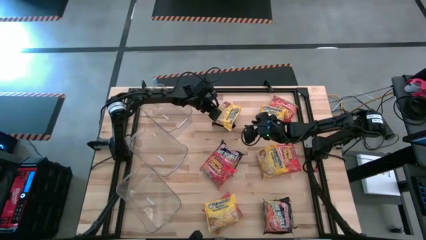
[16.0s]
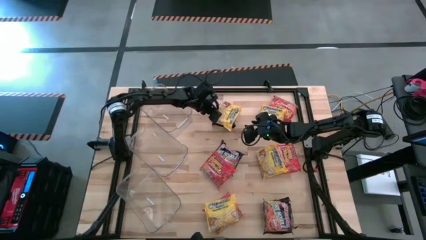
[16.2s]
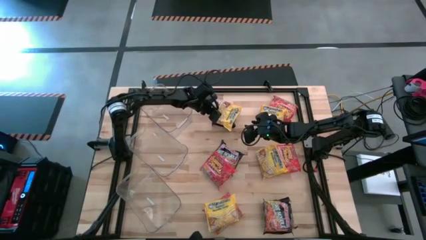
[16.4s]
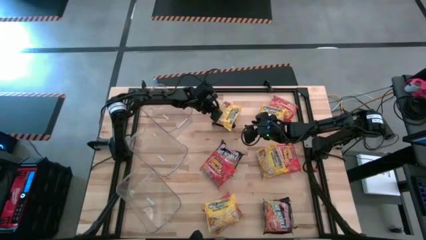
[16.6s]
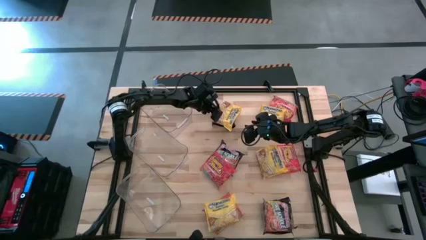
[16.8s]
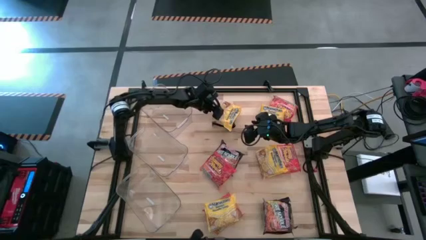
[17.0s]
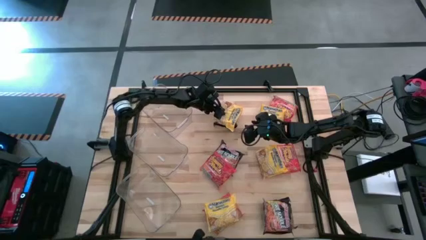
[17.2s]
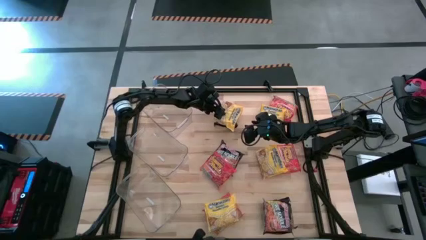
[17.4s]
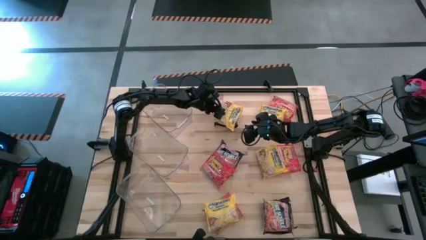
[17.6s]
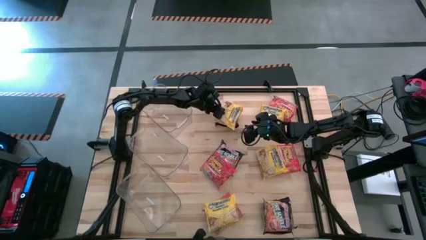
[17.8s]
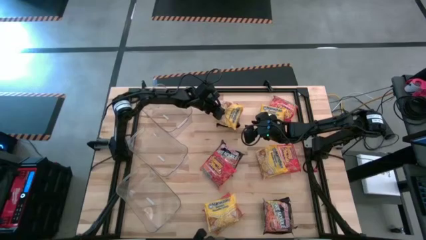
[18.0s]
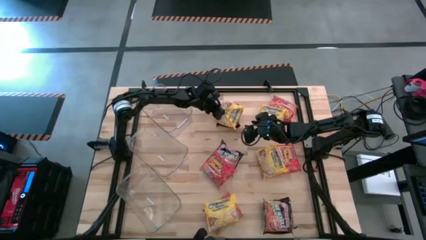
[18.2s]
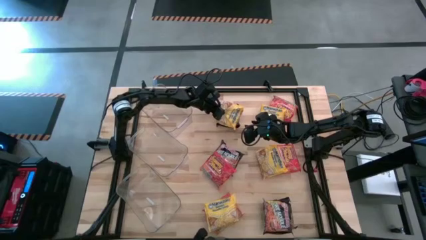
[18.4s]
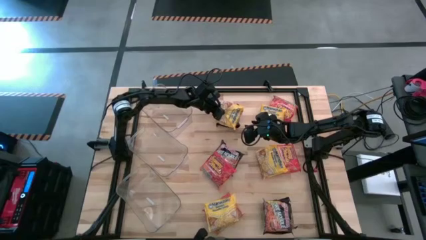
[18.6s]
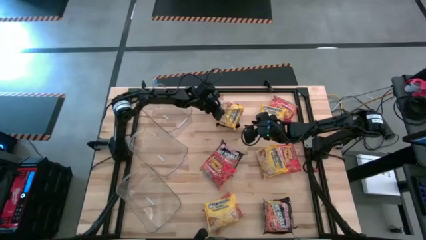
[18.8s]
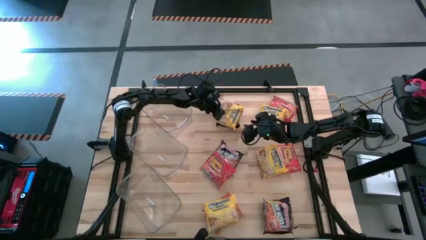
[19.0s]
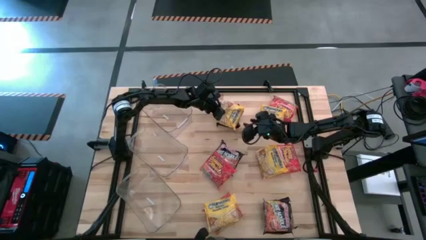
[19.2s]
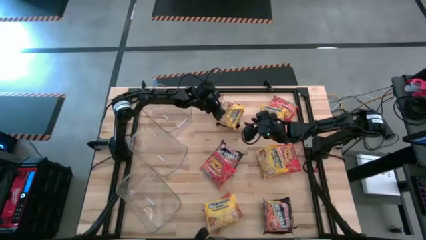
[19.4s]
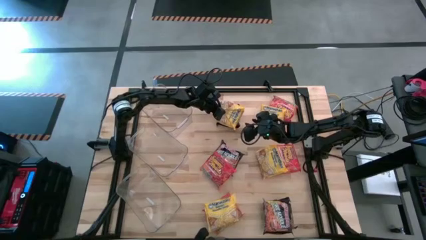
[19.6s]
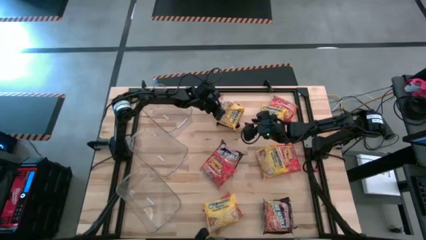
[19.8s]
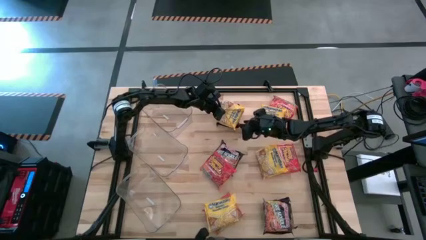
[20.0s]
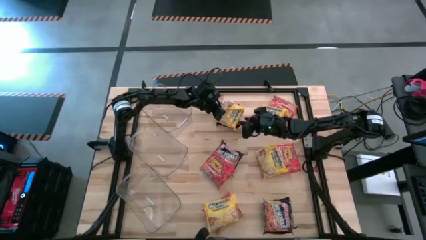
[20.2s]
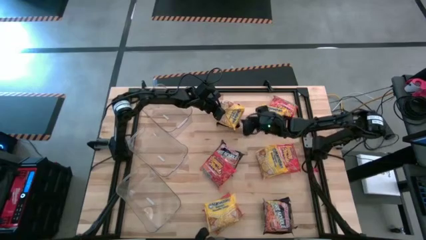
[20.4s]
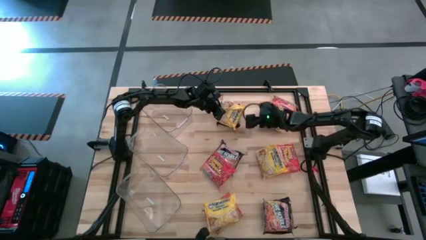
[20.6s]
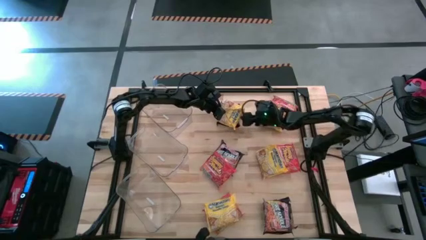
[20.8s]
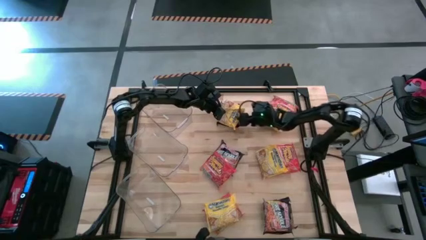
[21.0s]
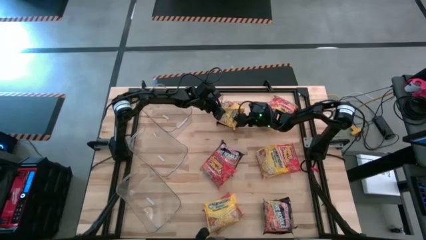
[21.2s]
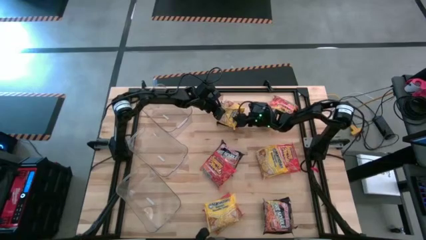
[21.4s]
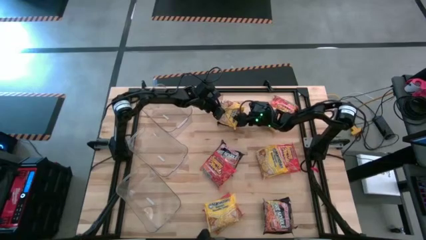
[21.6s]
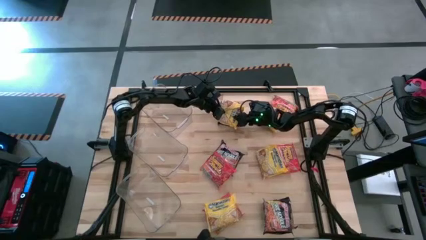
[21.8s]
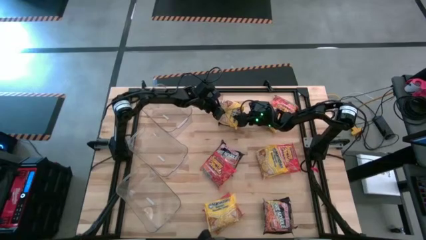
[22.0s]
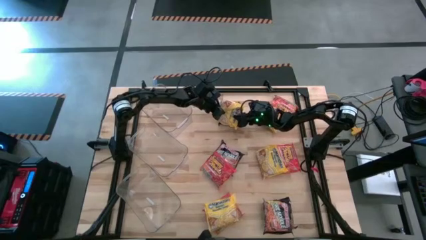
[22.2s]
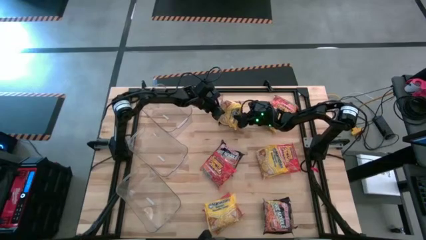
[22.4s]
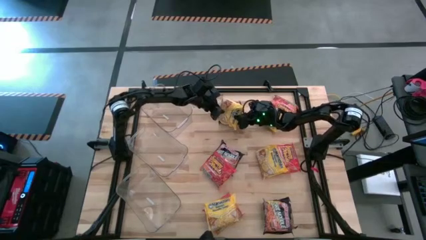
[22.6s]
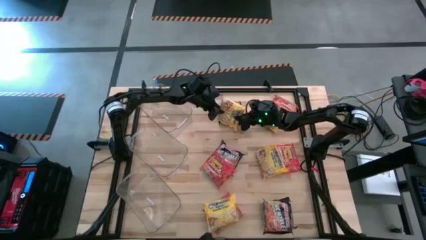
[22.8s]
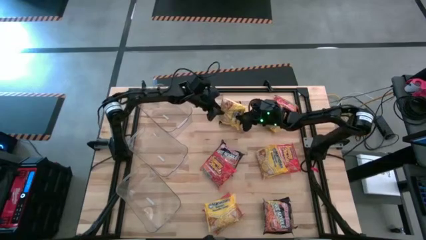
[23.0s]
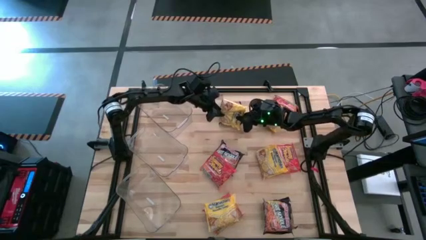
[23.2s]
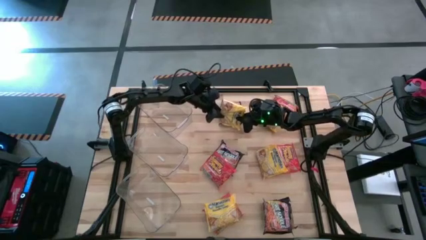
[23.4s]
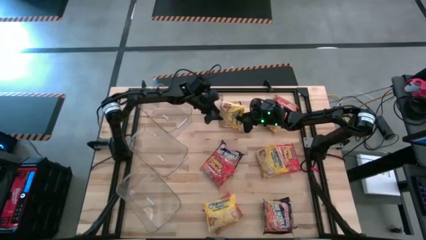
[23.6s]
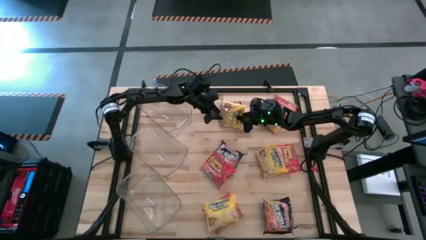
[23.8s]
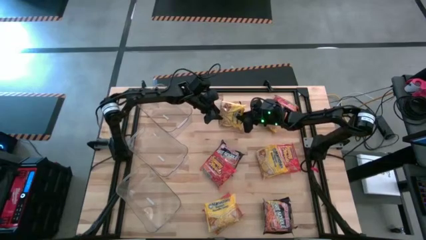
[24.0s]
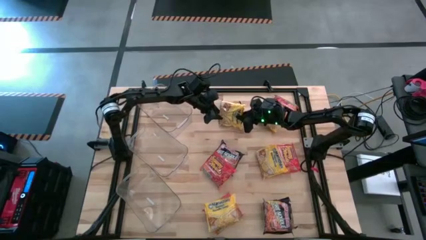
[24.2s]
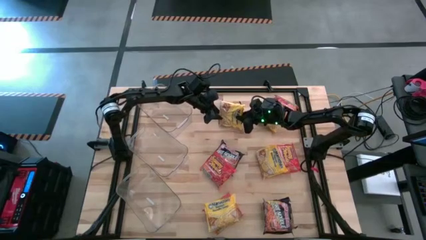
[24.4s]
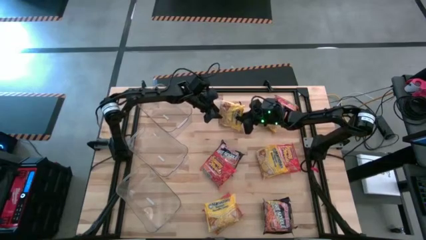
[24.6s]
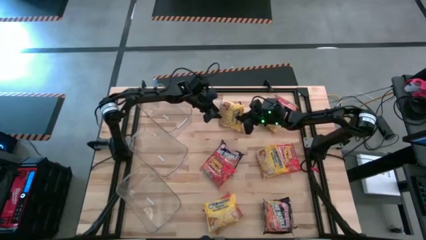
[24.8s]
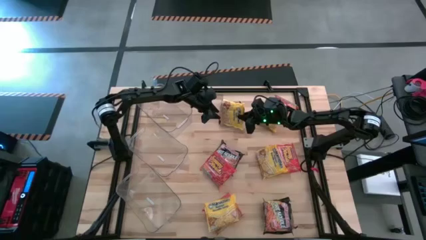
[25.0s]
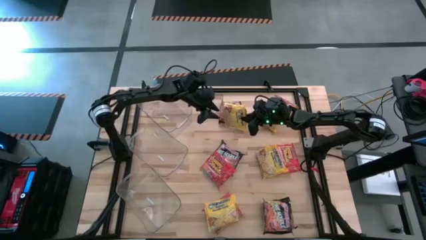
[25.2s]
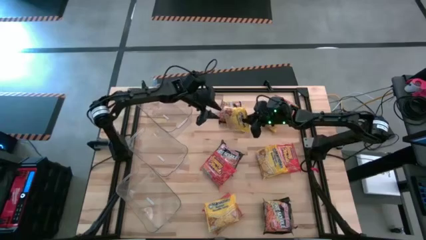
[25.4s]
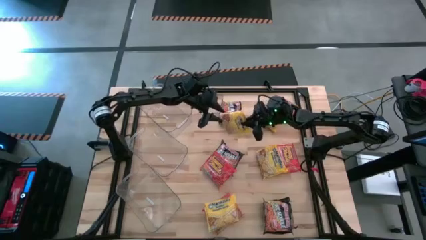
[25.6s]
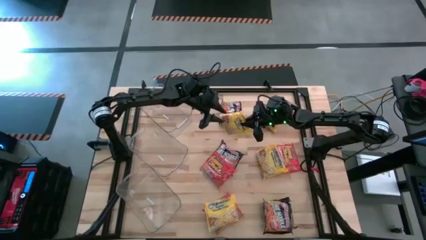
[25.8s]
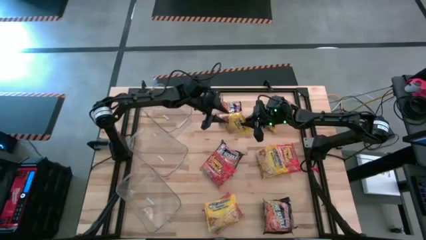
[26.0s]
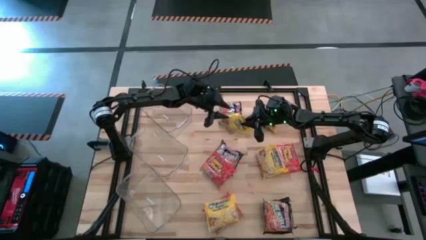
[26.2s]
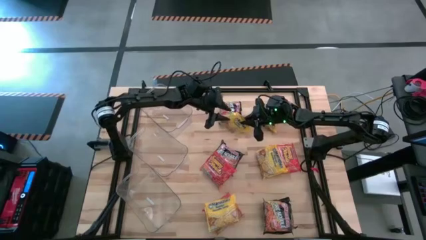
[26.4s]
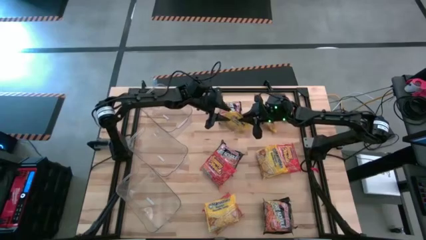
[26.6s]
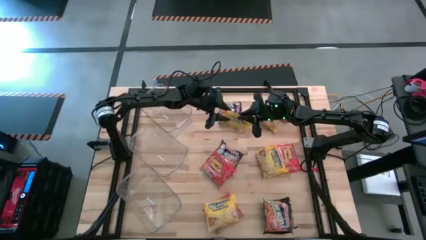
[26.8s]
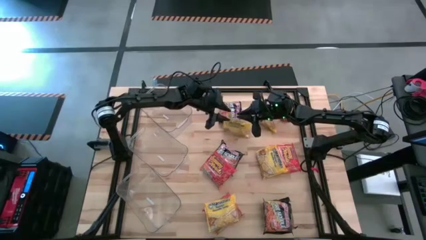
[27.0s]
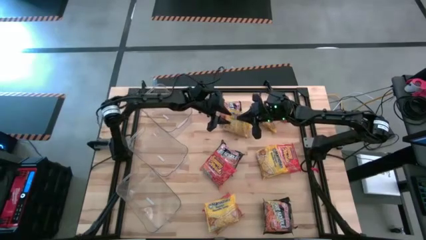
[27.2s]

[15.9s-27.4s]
Task: Sort Maruchan noodles
Put the yellow noodles pack into the top transparent bin
